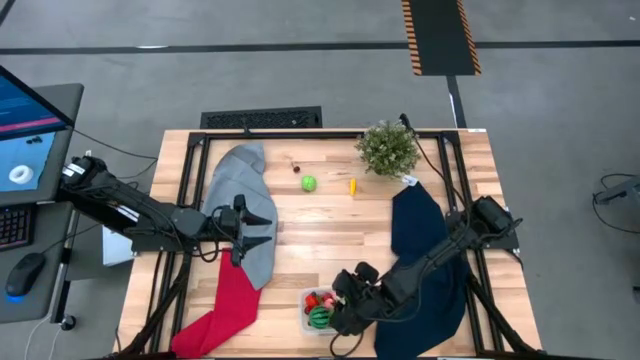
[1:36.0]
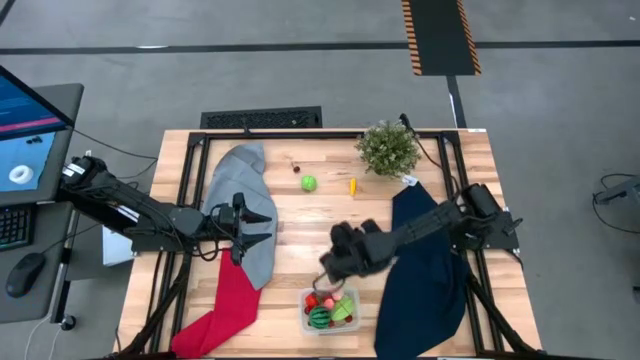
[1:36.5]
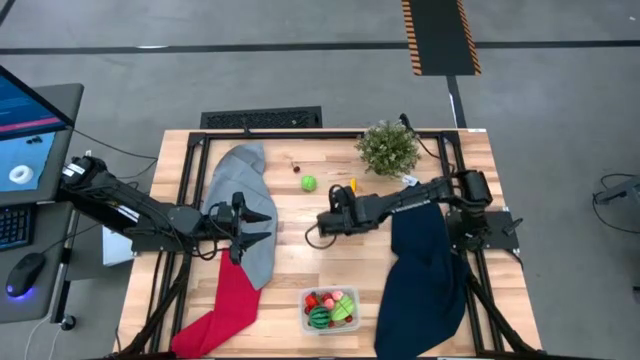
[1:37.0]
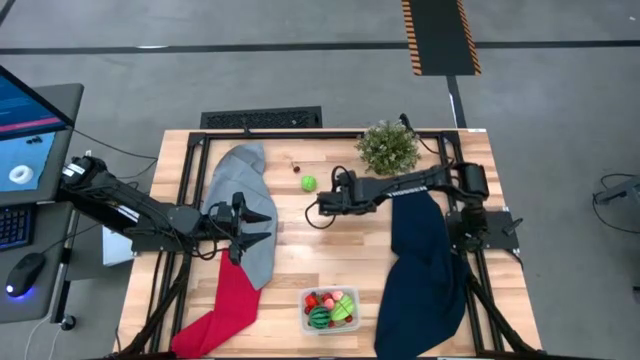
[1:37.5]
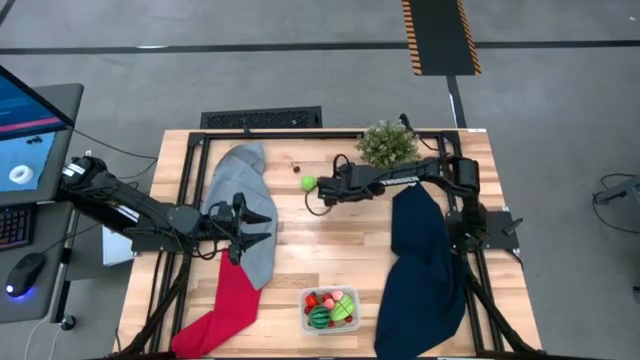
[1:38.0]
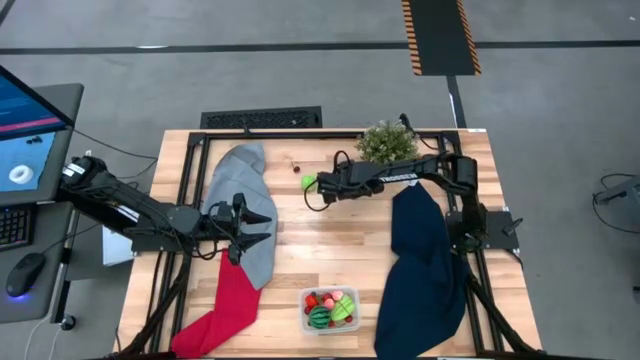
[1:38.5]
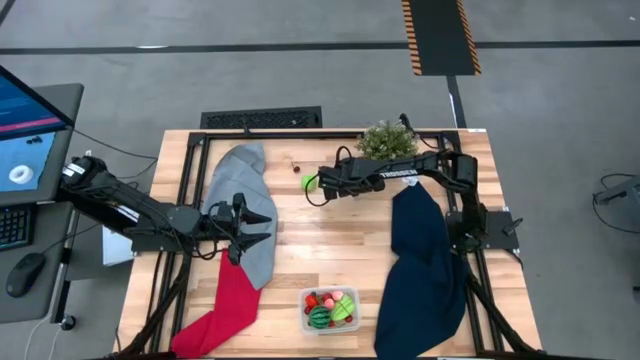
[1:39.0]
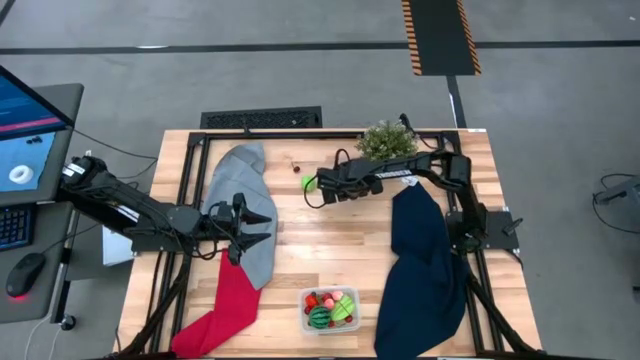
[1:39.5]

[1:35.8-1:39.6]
Task: Pick and placing Produce into tupperware
Put the corn into the transparent bin

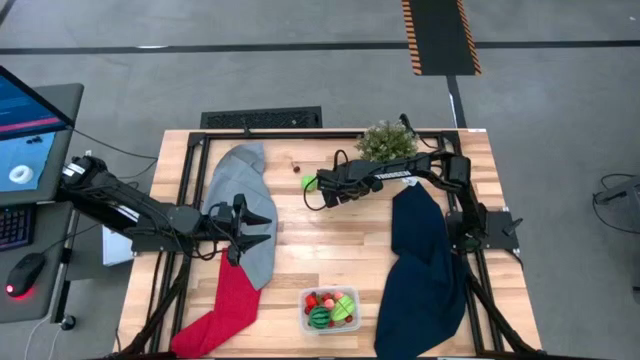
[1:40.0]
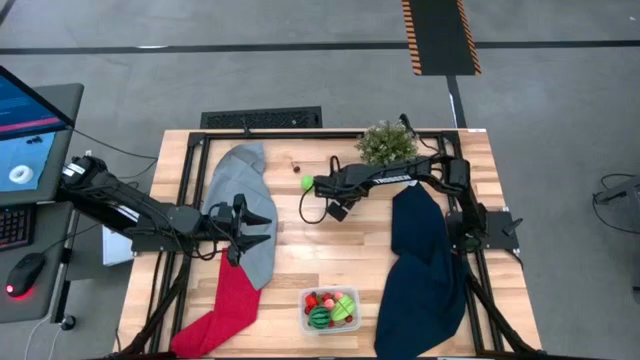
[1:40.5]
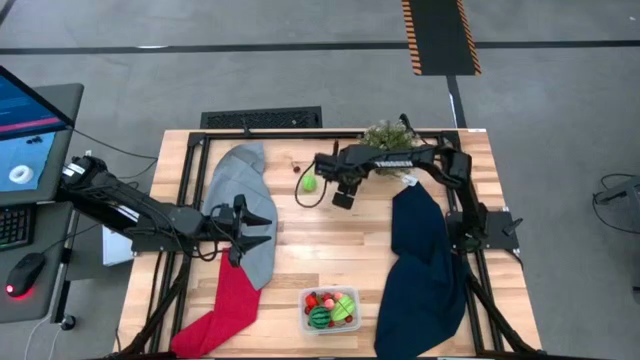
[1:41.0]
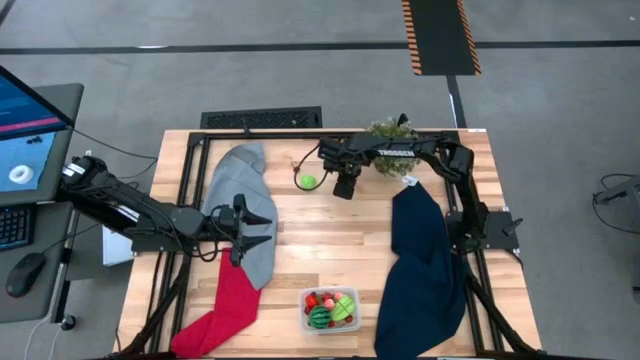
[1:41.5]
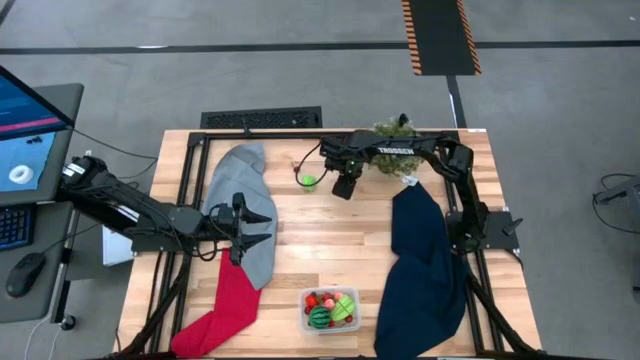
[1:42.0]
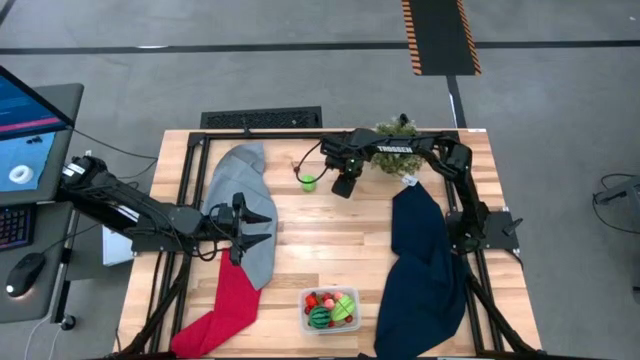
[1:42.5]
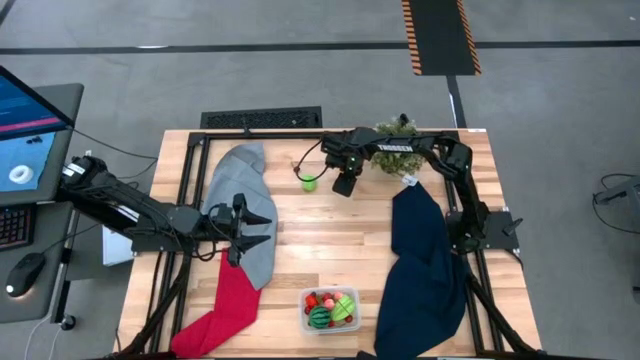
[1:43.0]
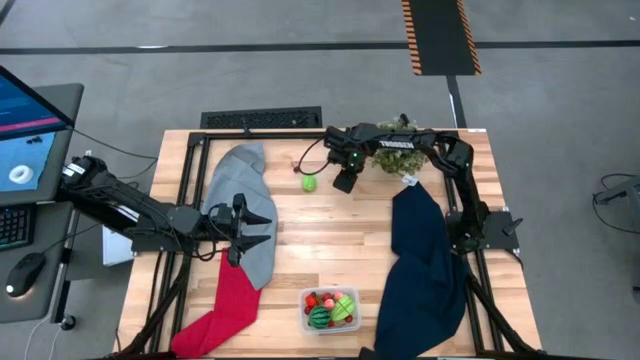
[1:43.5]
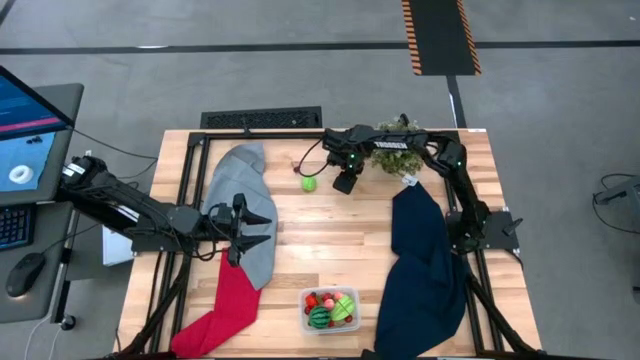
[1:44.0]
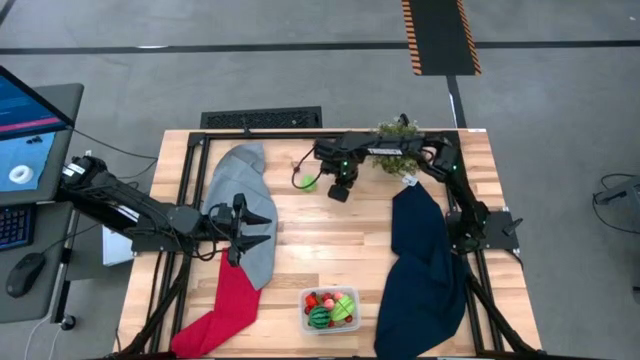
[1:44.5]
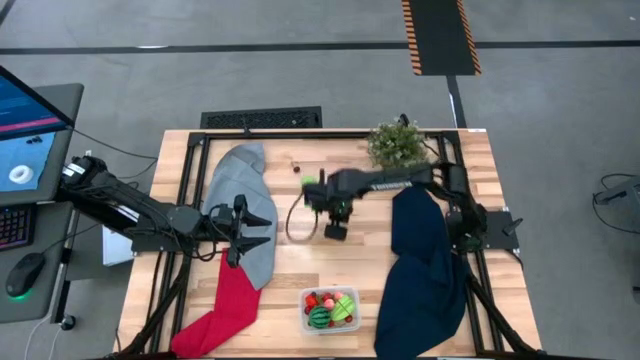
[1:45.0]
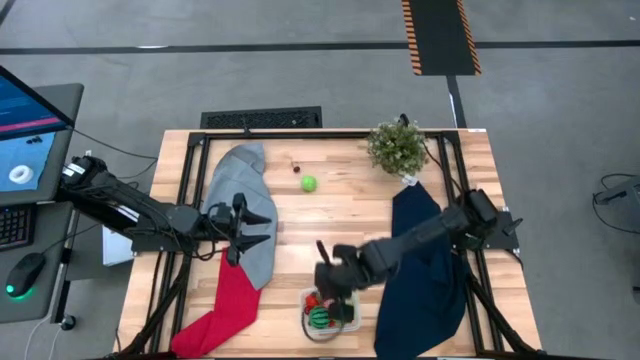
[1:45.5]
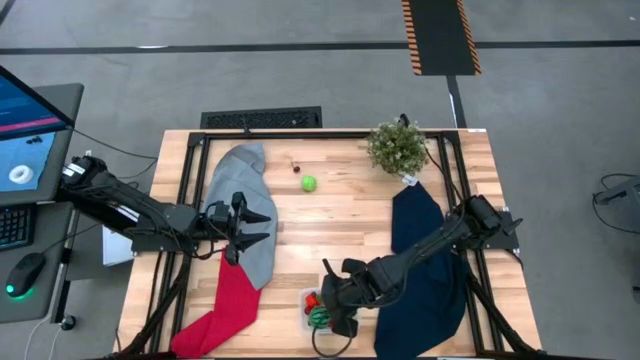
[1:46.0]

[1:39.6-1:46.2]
Put the corn into the transparent bin

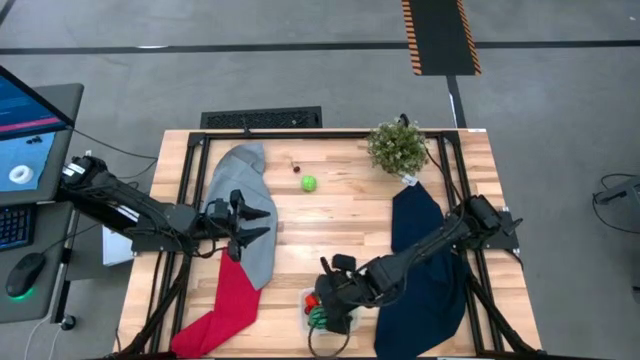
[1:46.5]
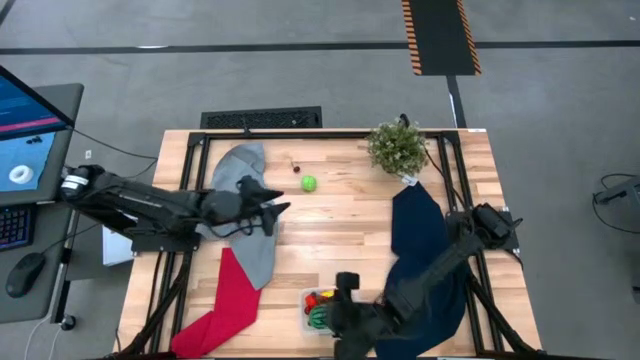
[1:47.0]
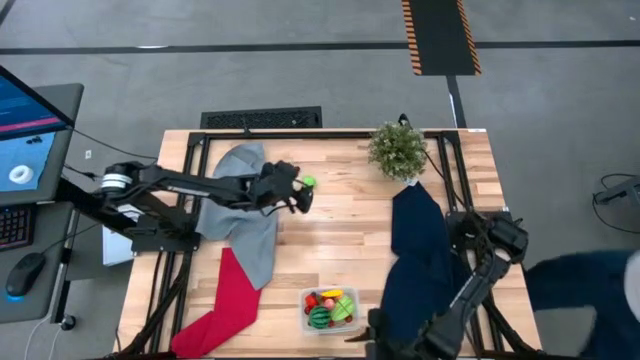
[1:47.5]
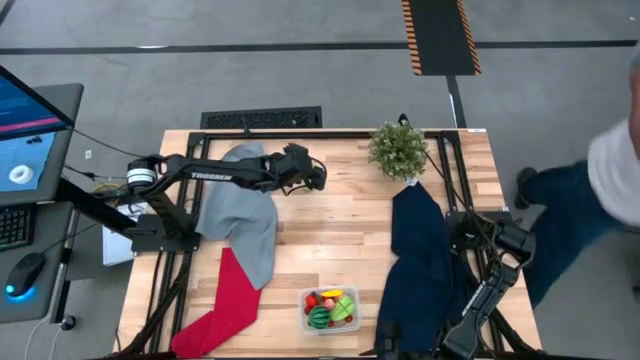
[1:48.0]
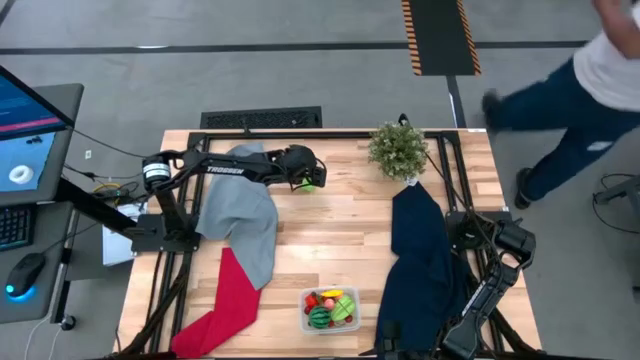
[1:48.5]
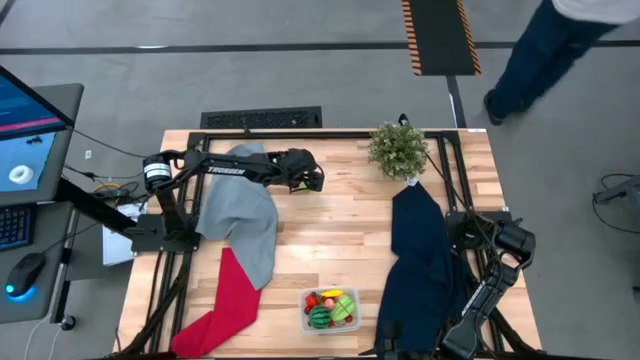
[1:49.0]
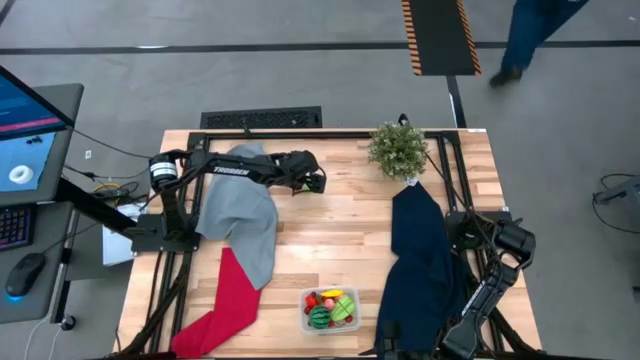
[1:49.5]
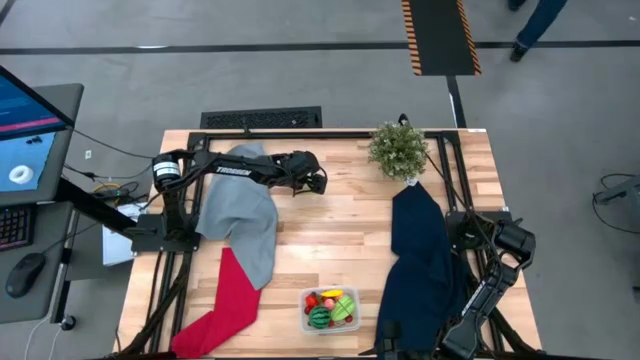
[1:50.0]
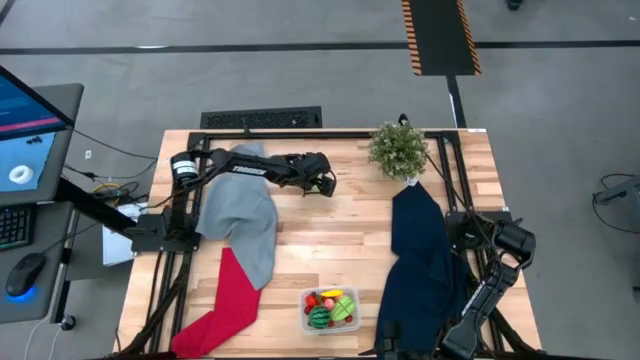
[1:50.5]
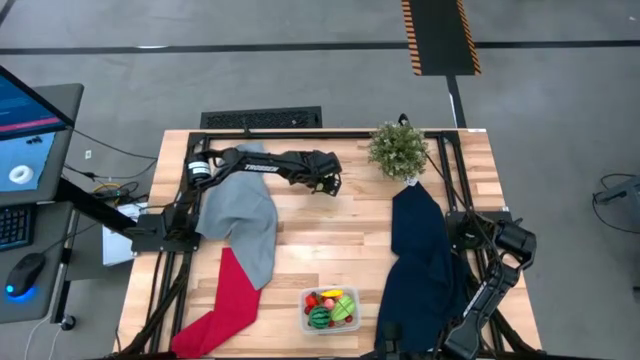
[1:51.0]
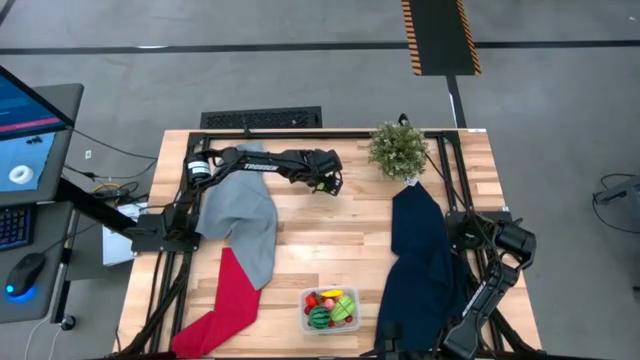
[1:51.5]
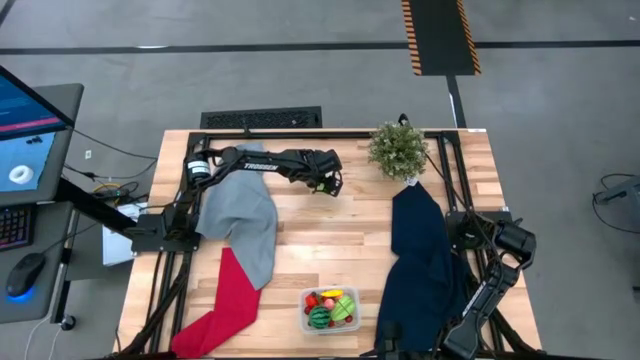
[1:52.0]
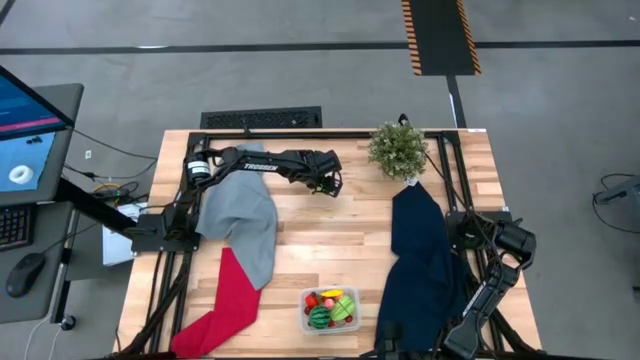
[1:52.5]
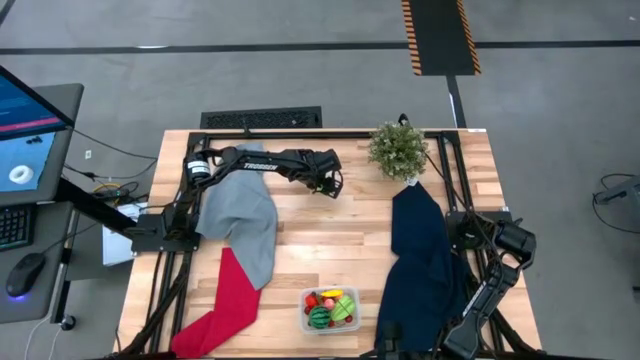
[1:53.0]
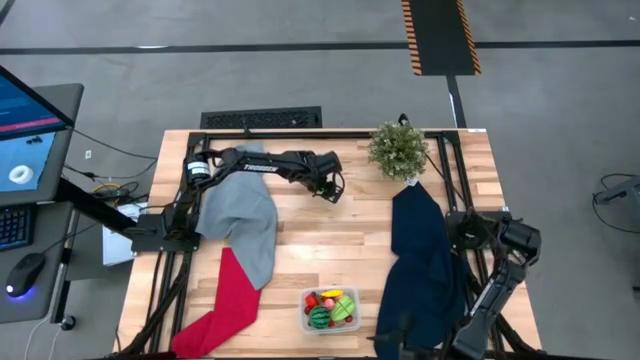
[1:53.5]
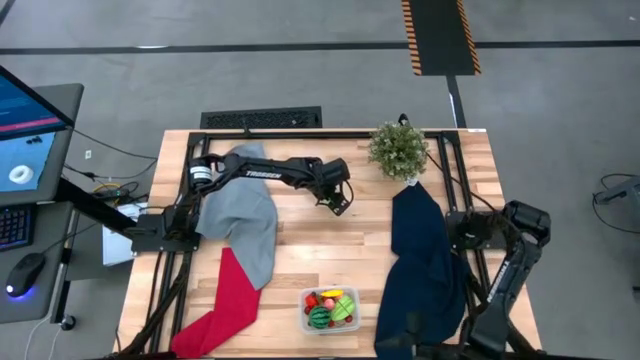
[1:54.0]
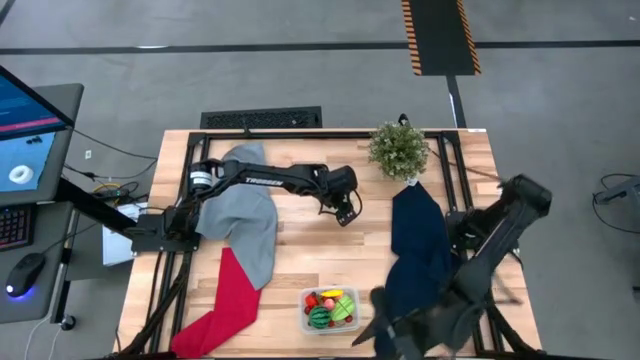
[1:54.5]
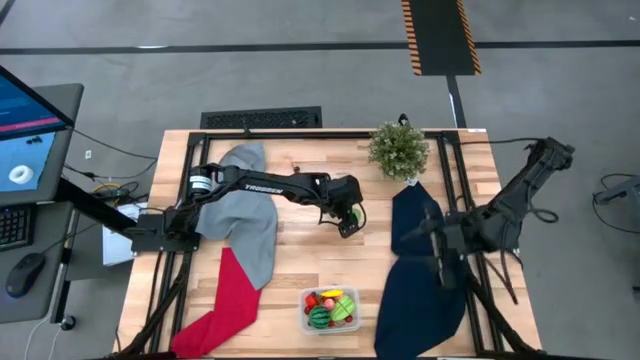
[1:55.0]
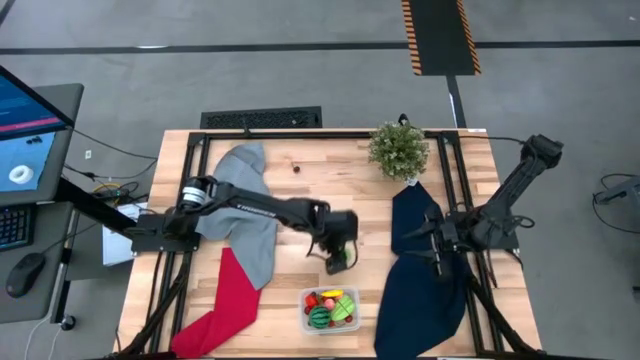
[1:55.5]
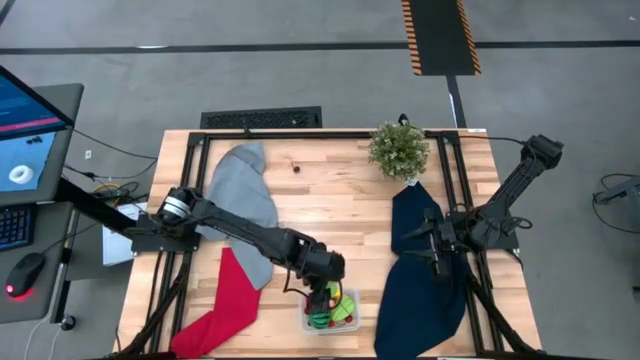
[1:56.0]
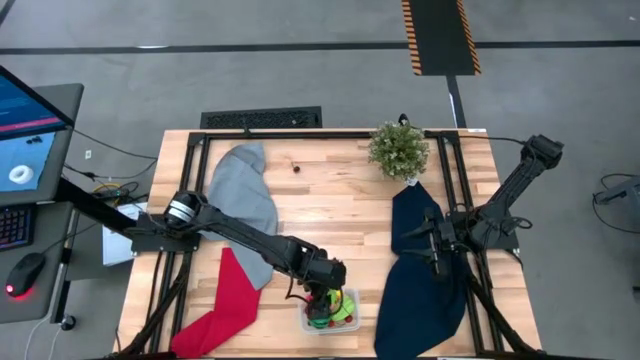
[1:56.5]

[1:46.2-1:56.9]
Put the cabbage into the transparent bin
